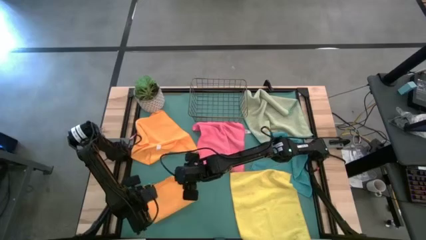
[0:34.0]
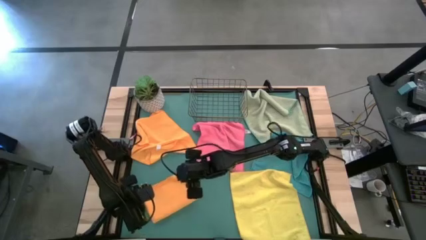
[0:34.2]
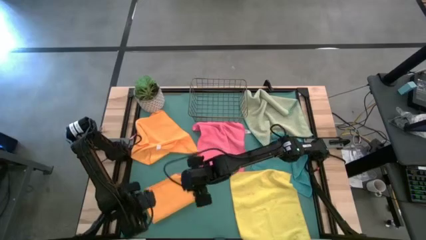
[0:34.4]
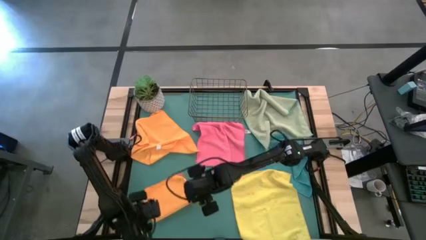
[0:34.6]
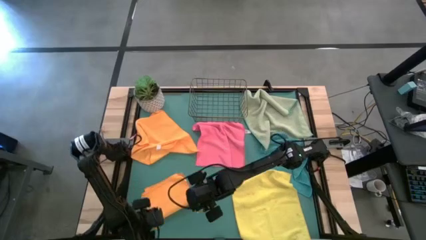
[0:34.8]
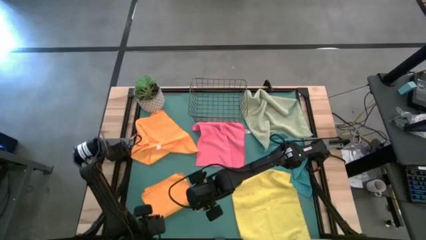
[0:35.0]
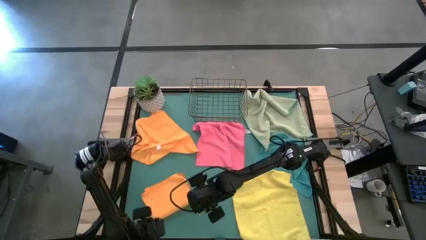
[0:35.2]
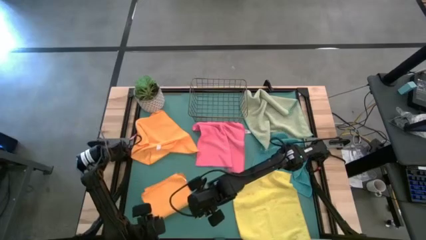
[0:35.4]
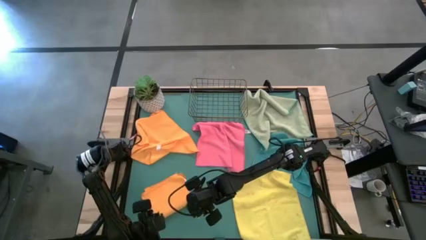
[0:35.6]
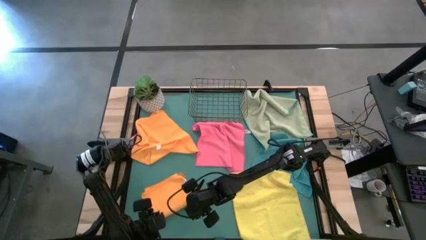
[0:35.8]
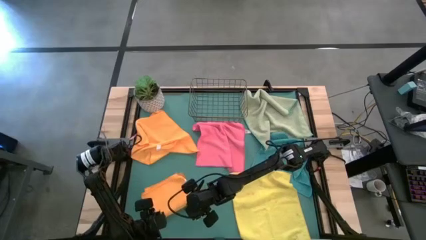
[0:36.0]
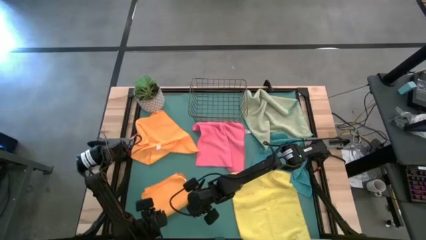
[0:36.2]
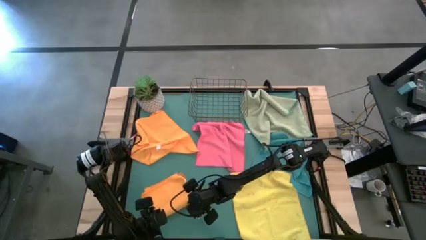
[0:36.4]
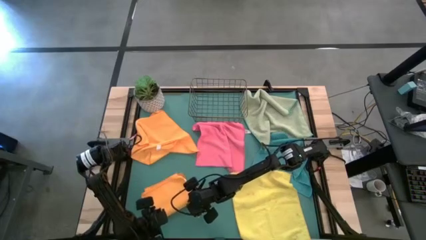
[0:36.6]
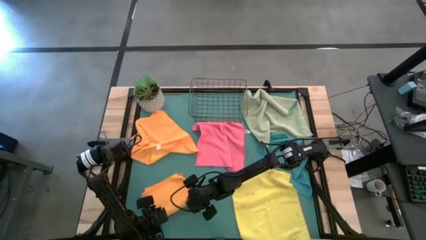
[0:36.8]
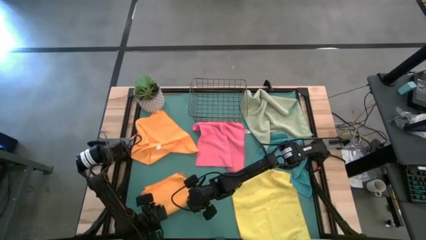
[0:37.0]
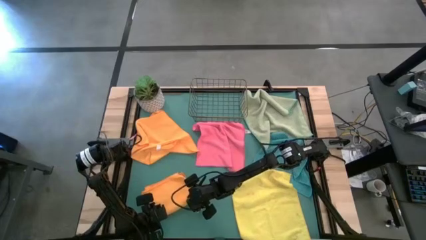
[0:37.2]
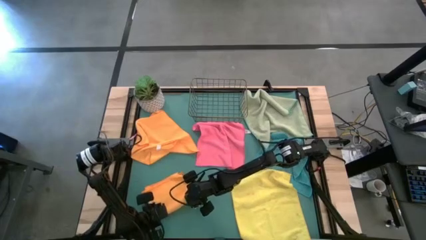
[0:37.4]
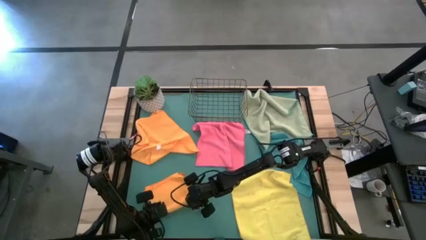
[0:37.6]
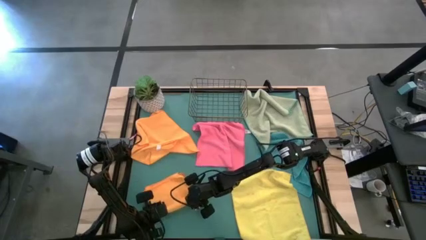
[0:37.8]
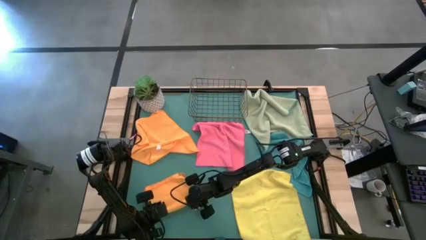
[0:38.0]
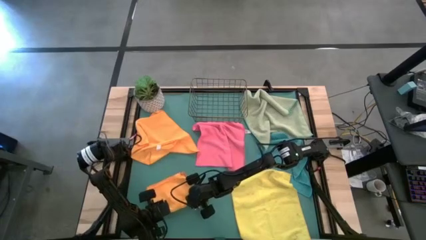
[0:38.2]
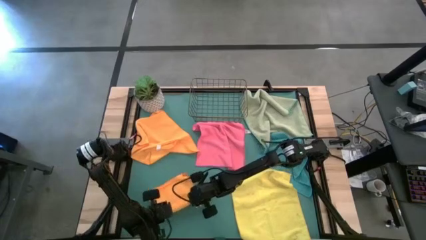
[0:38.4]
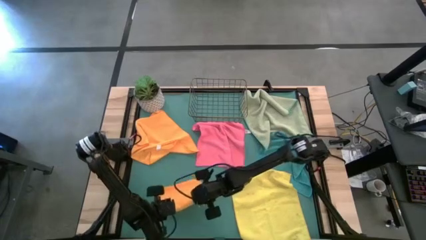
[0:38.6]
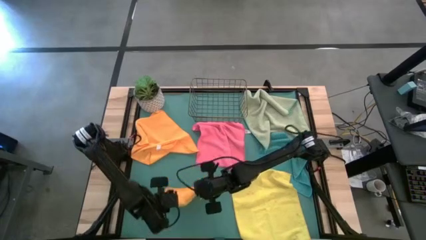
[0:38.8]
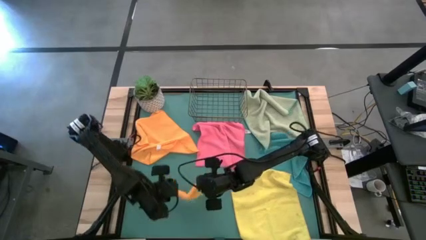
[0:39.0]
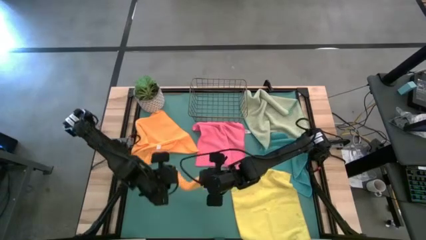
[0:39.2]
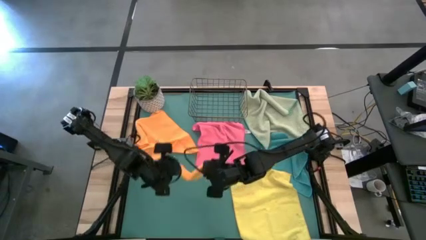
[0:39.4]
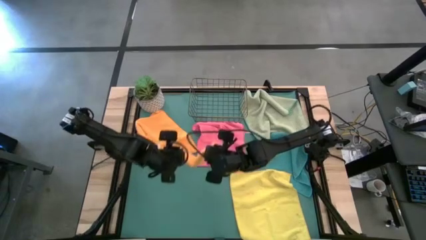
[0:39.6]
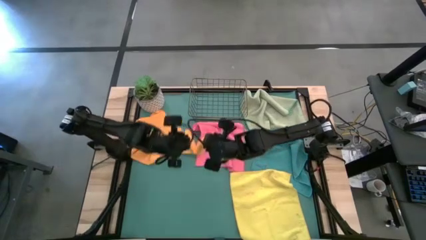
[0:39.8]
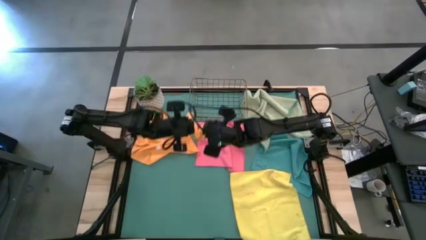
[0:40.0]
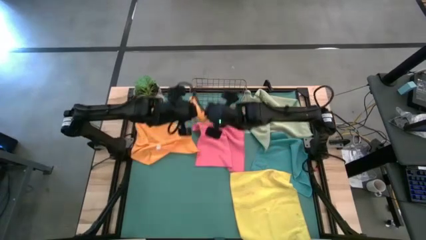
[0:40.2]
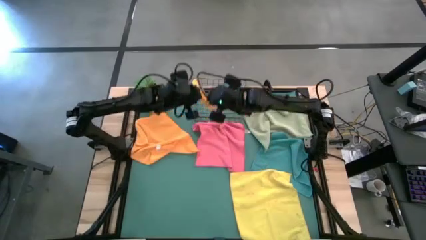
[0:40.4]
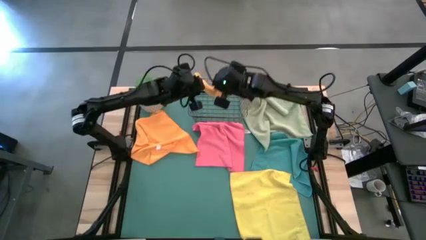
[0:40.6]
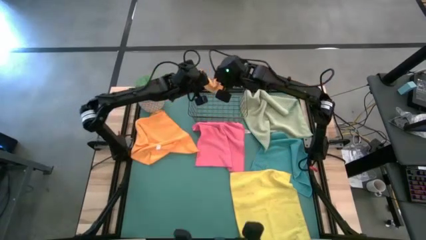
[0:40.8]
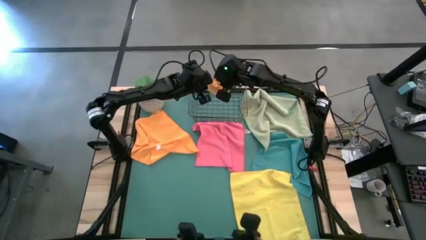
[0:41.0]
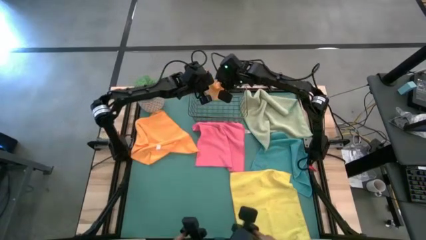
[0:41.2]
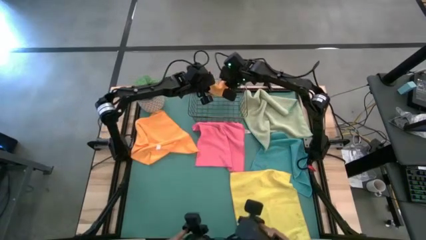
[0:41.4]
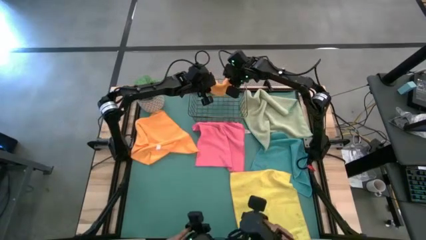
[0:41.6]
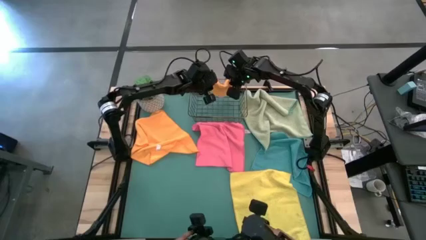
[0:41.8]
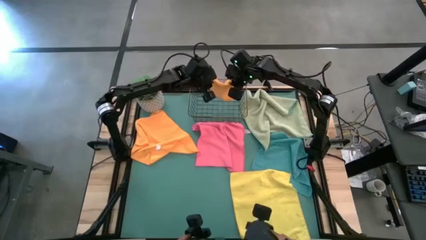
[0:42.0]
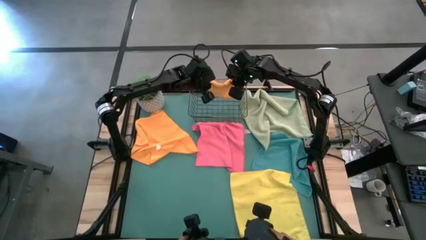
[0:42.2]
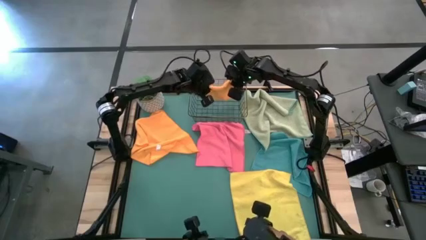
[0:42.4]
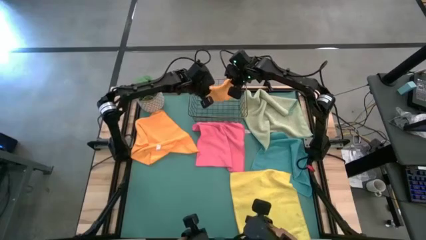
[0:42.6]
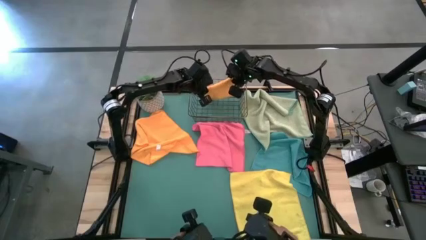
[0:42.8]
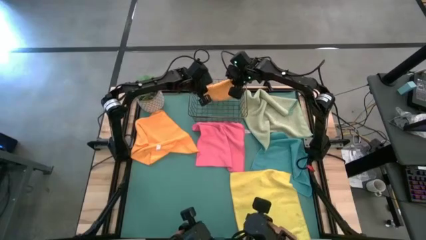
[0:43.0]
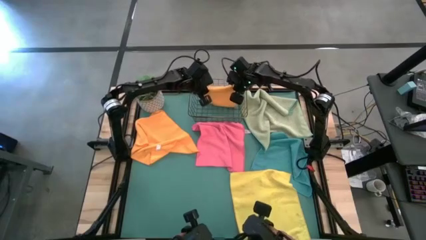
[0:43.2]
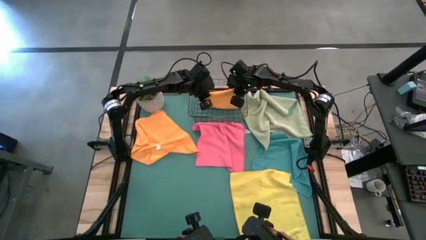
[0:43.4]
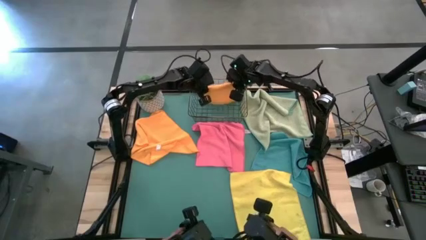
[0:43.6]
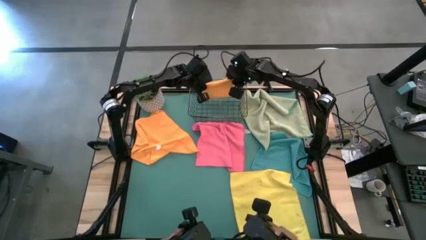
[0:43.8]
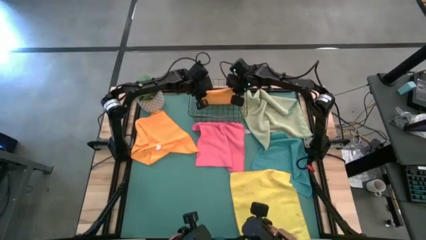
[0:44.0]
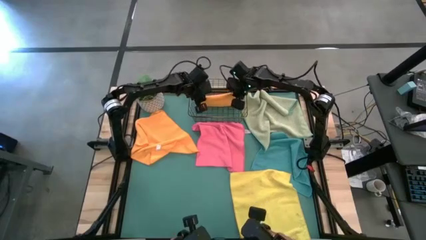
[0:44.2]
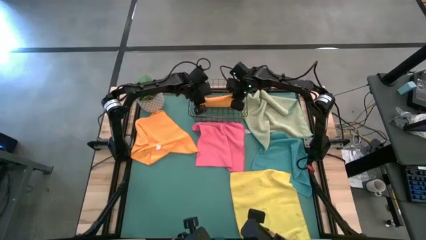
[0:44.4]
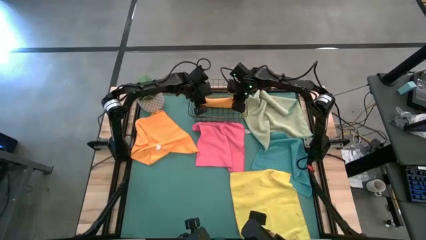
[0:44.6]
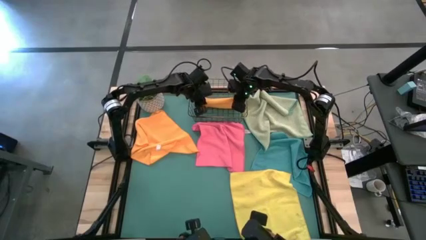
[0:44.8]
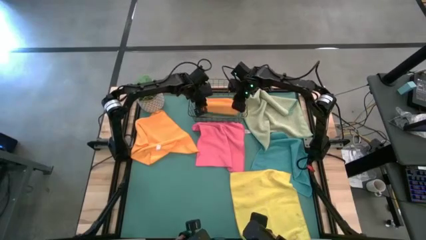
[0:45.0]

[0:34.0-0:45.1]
Task: Fold microfiber towels
Put the folded orange microfiber towel into the wire basket

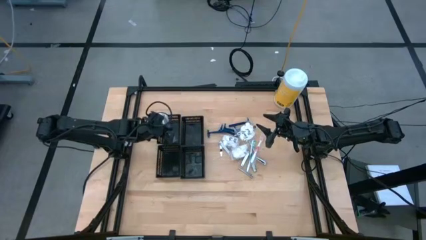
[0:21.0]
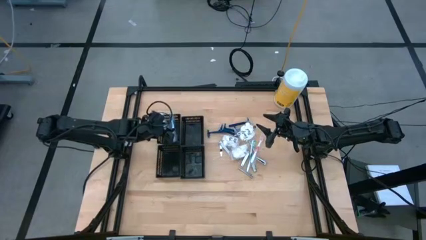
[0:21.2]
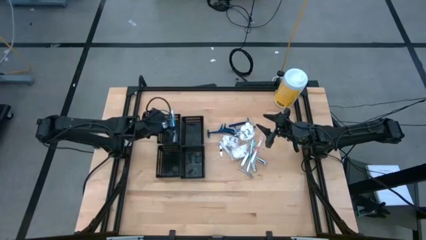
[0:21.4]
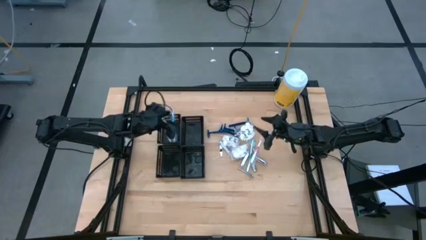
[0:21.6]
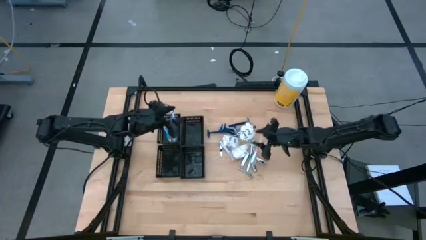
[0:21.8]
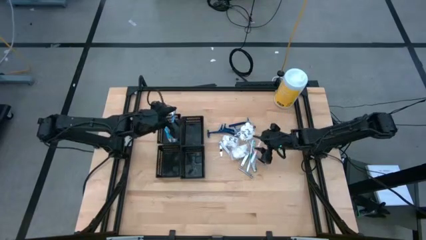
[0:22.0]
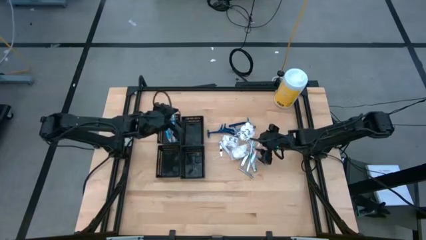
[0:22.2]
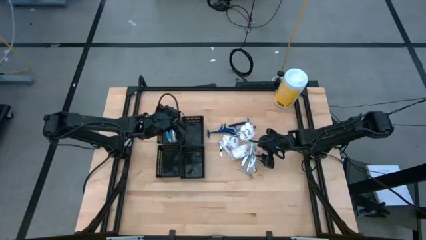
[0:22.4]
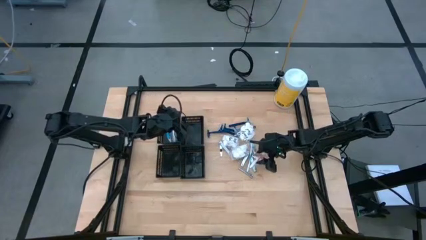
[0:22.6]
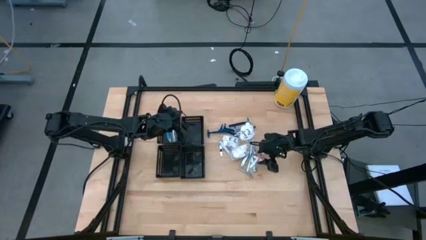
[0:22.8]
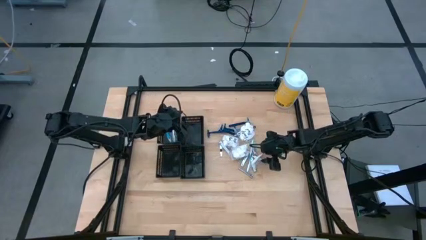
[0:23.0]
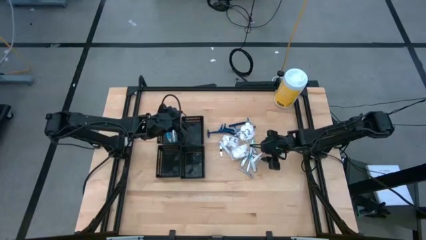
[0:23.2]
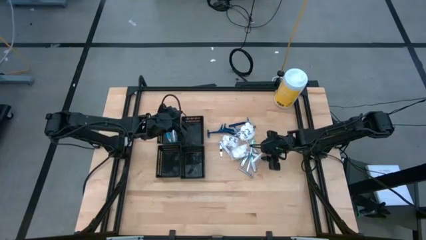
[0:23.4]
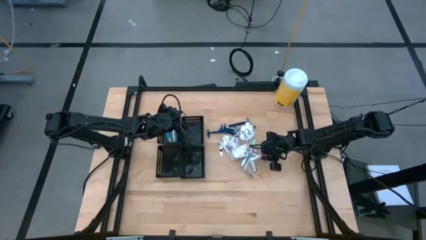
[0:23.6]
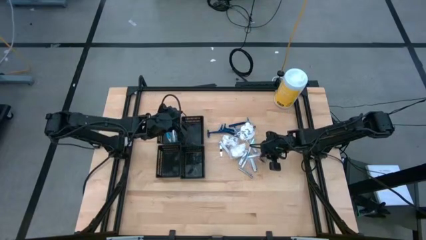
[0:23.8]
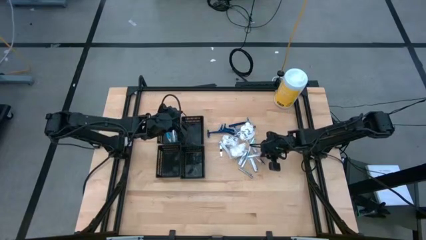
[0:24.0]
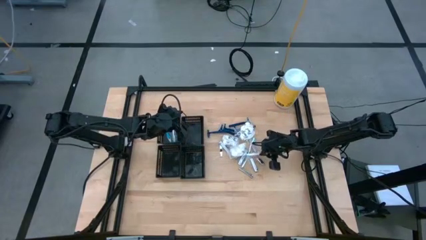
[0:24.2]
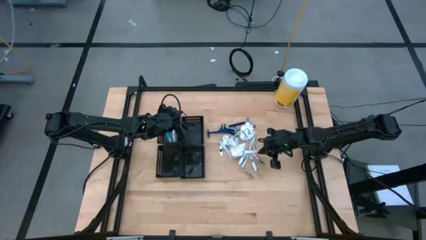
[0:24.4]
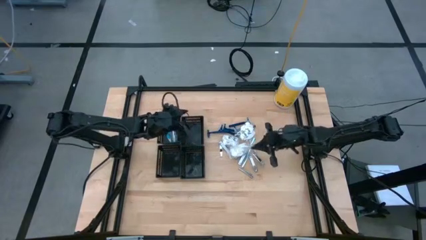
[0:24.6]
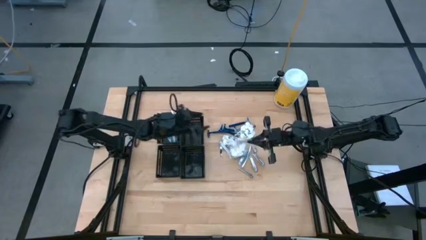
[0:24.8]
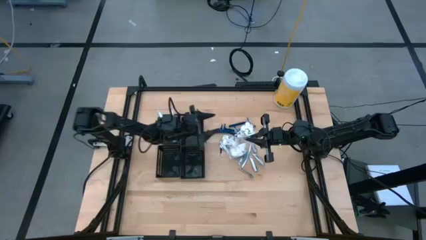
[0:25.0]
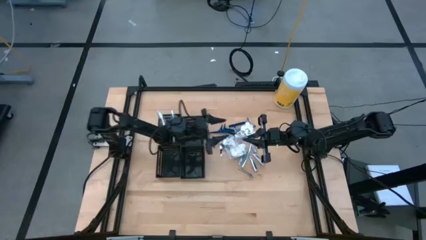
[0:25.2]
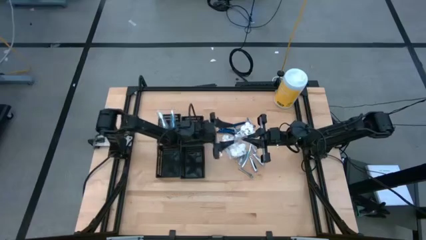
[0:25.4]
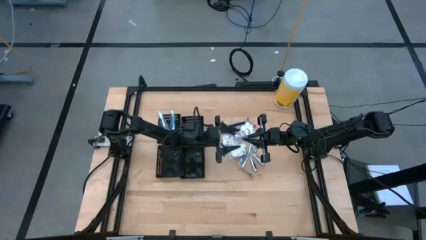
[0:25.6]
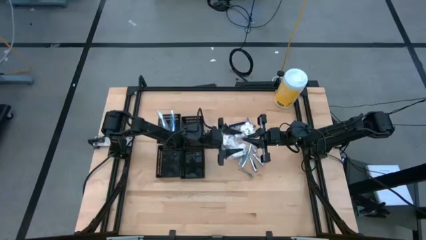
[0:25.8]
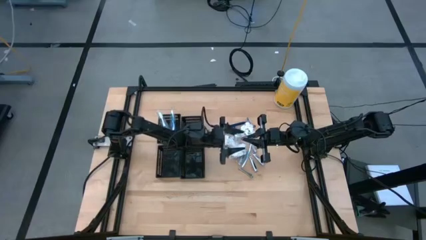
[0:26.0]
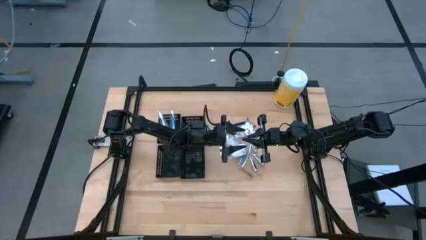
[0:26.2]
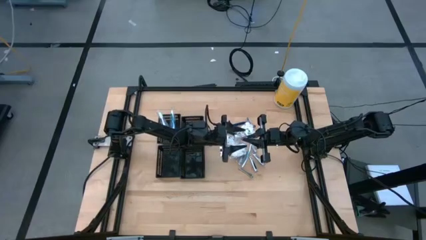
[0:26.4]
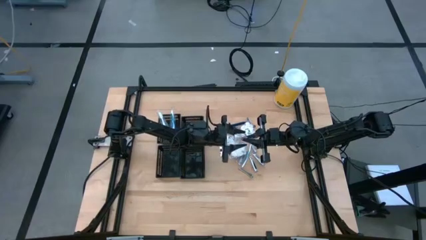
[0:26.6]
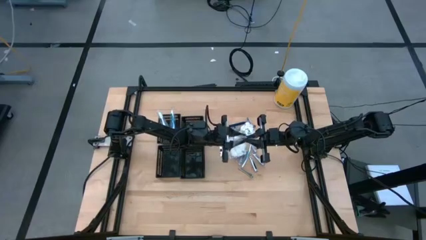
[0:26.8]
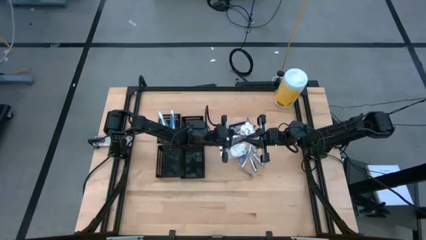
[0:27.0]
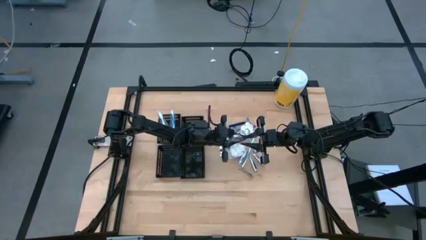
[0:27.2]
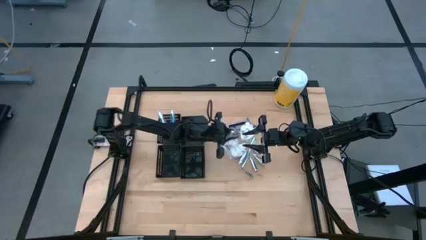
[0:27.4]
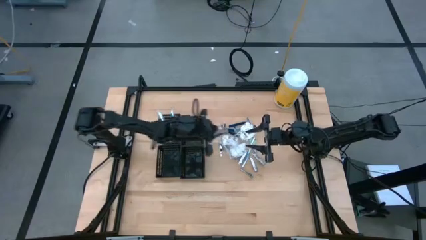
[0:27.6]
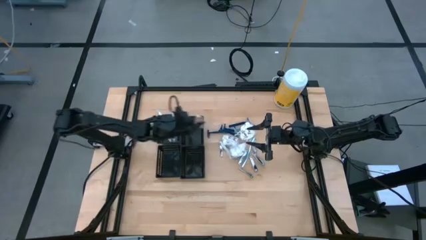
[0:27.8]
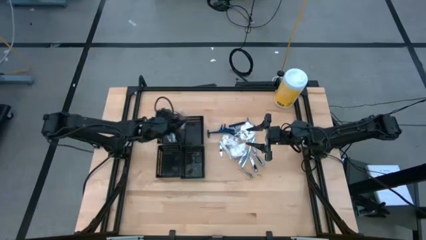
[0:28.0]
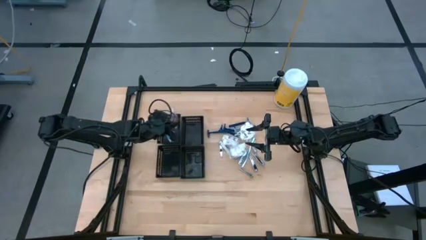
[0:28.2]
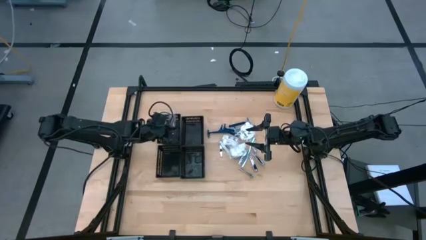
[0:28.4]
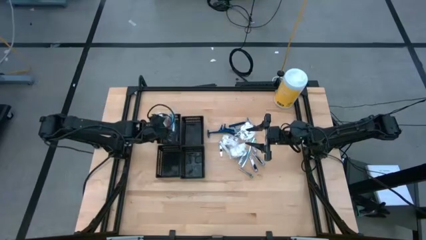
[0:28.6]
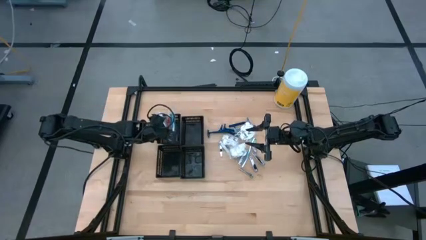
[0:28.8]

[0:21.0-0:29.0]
Task: Pick & Place Travel size toiletries
Put the red toothbrush into the top left black bin
